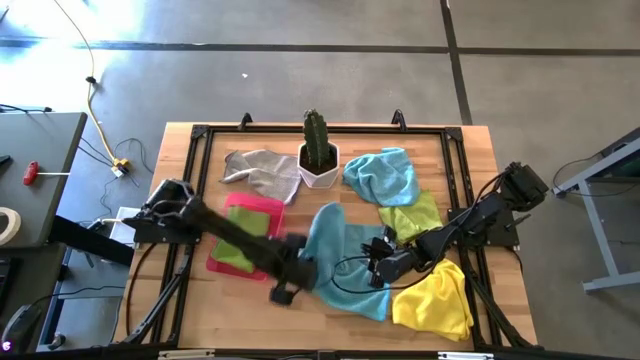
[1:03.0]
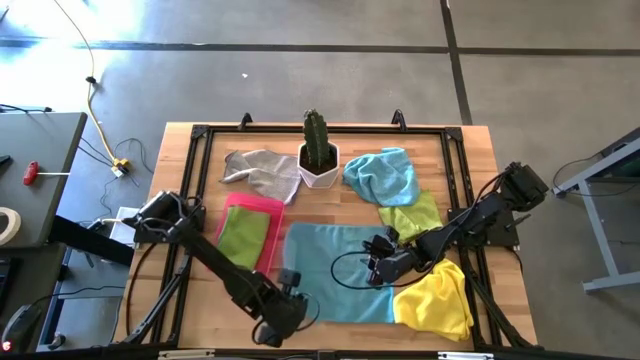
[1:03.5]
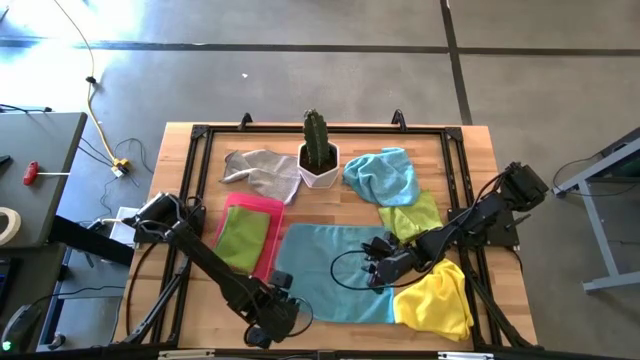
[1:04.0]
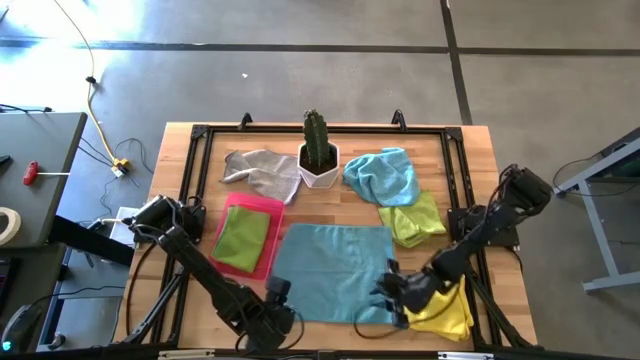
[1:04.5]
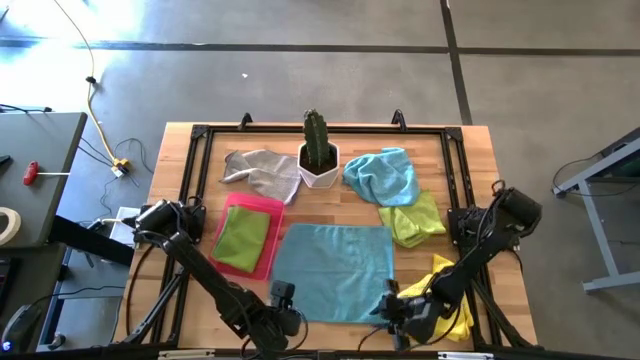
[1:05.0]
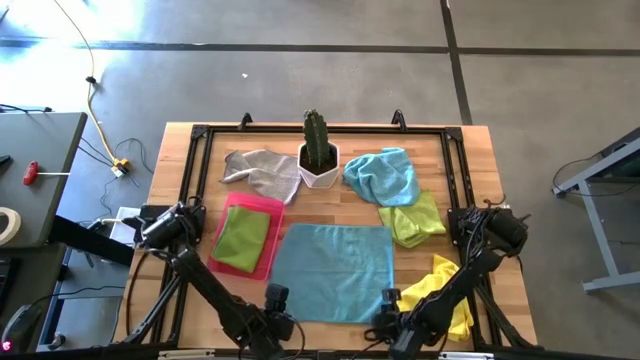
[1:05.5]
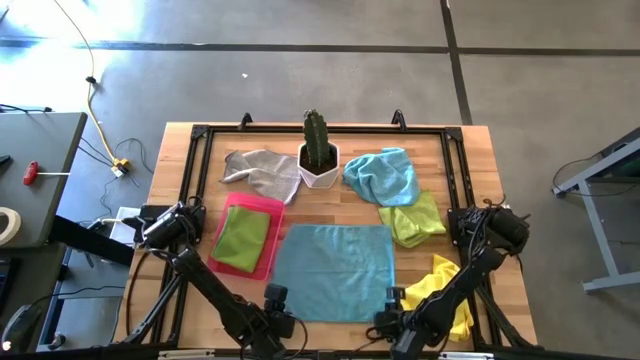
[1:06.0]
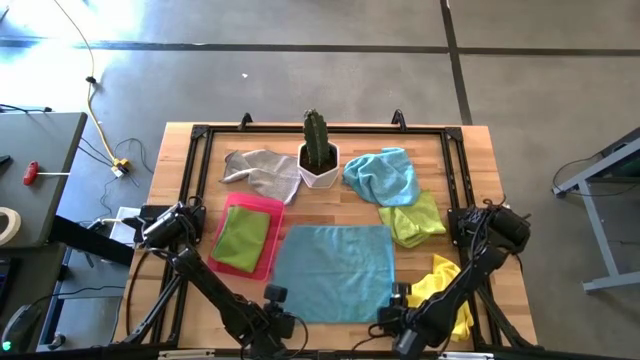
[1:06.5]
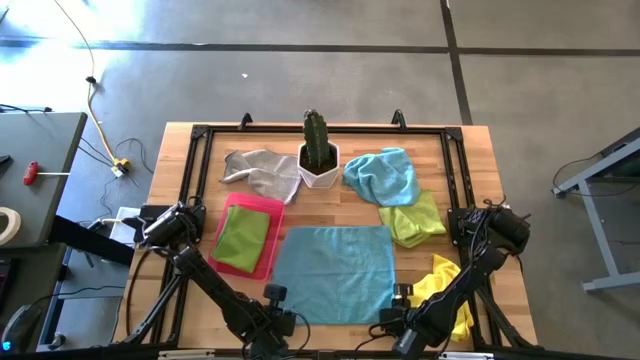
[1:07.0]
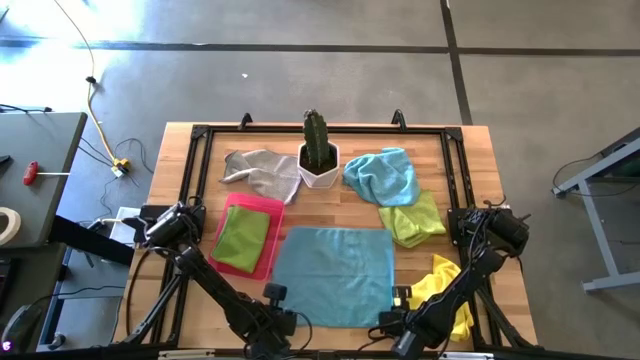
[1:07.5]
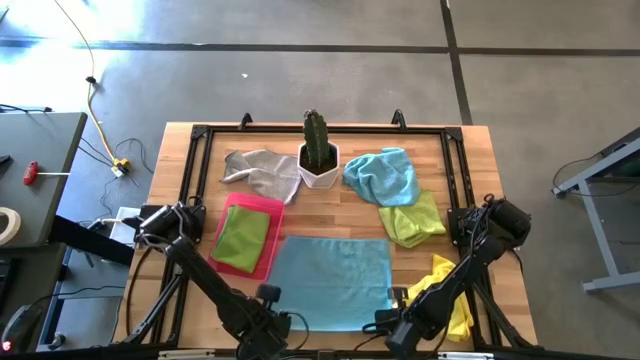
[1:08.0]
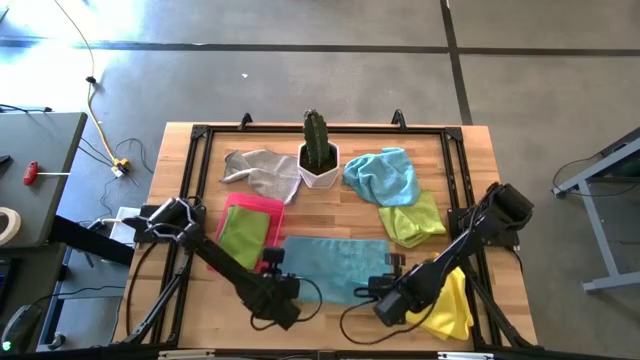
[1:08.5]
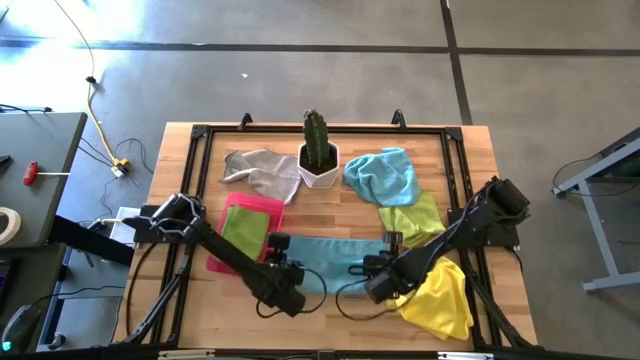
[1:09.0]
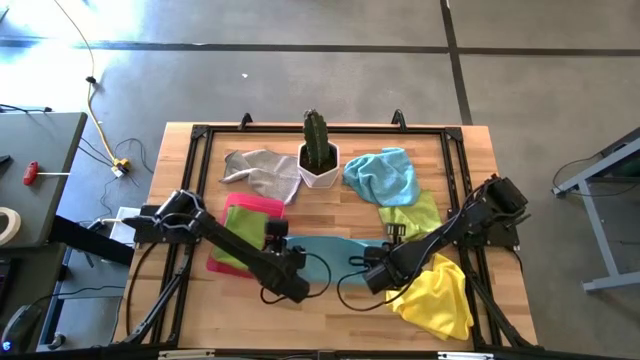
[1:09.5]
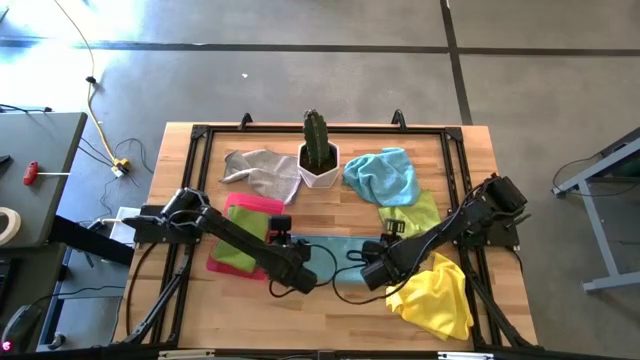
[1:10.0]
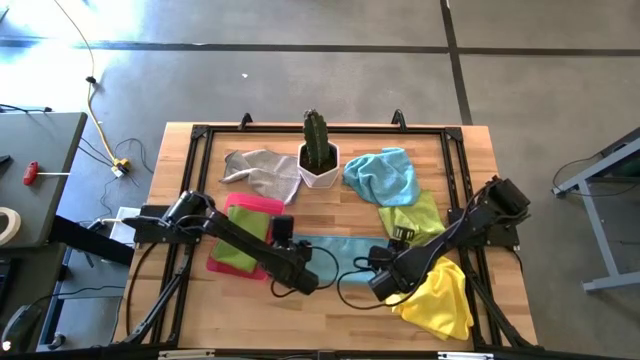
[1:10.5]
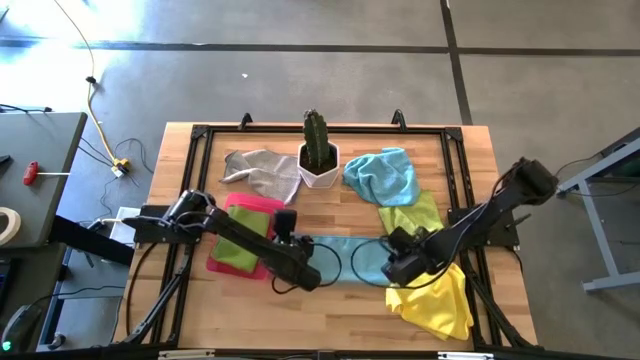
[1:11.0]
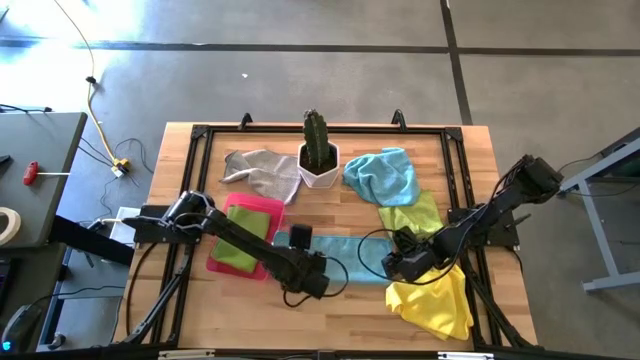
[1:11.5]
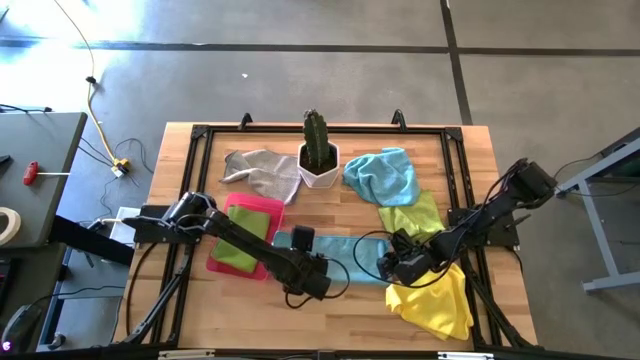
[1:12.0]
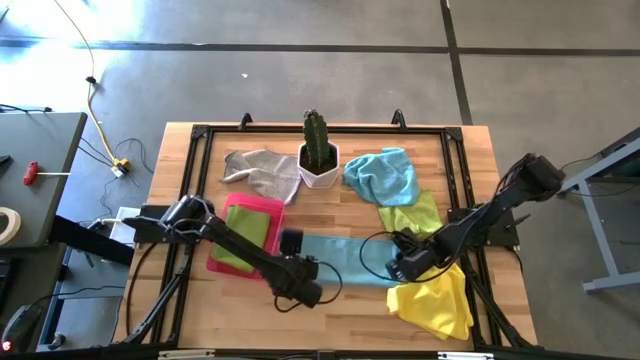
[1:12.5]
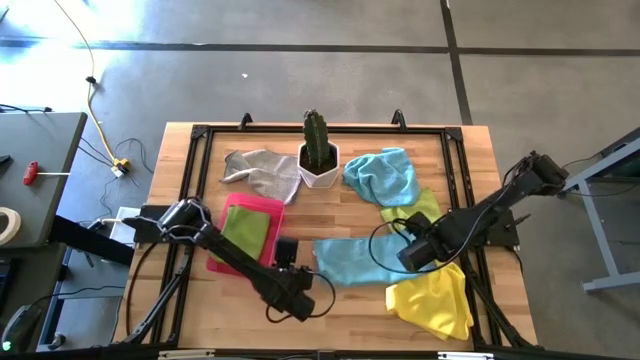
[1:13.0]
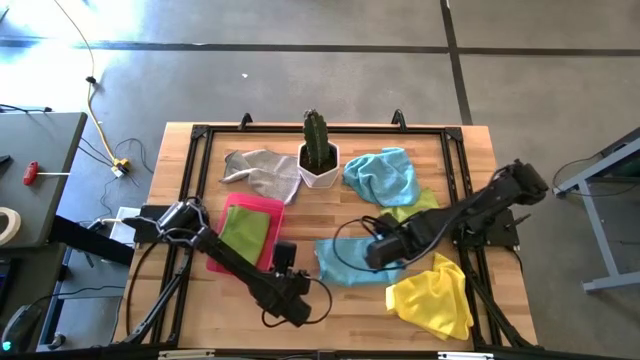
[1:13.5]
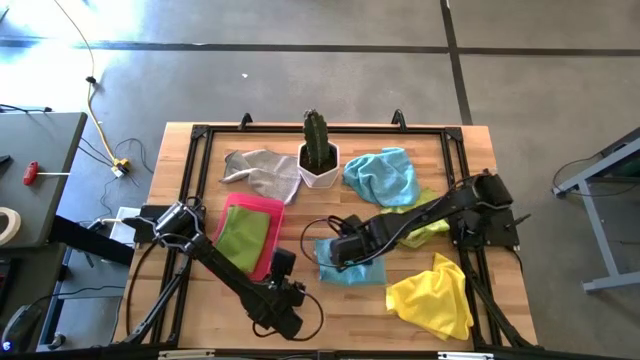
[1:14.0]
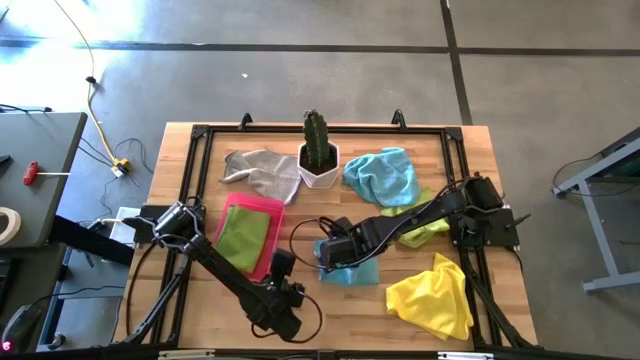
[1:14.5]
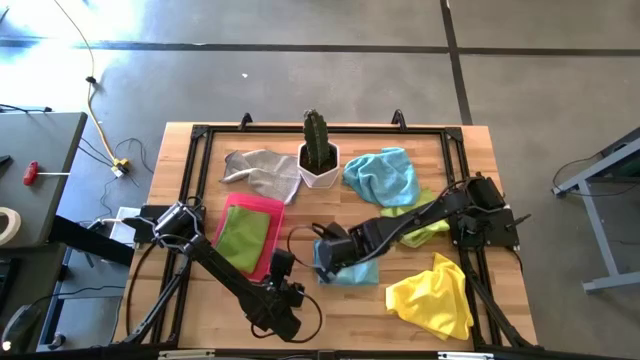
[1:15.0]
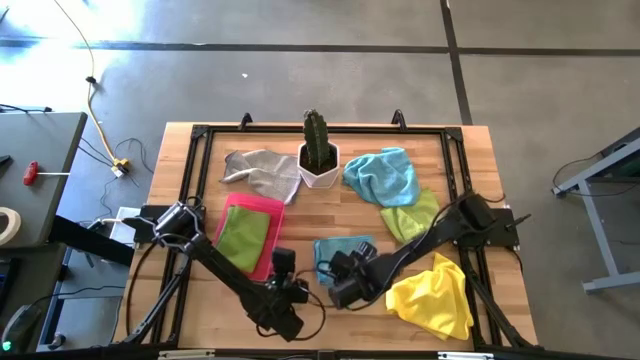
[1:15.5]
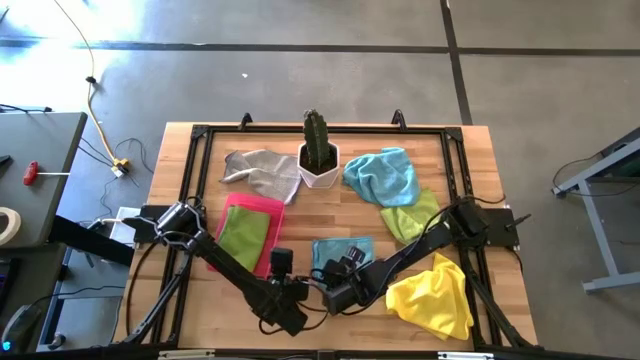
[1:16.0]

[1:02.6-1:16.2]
Task: Fold microfiber towels
Fold the bottom blue towel

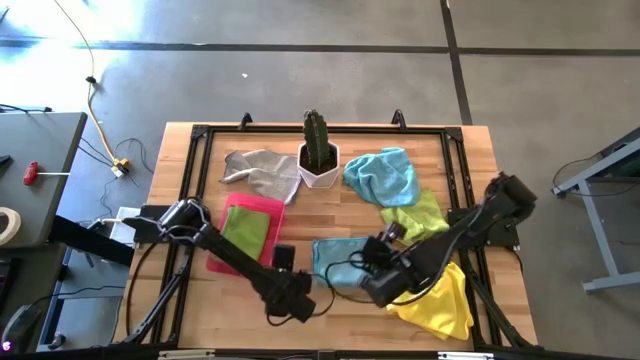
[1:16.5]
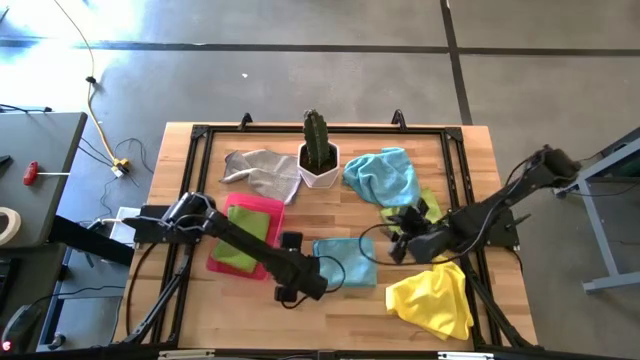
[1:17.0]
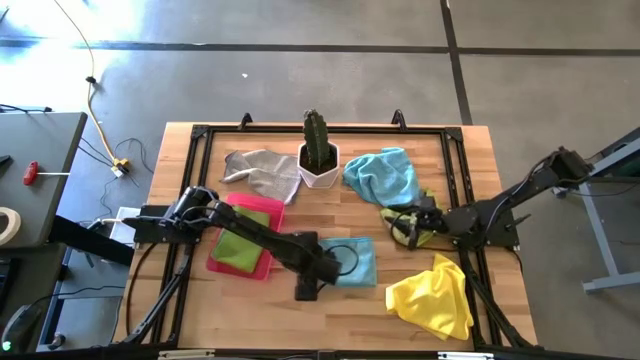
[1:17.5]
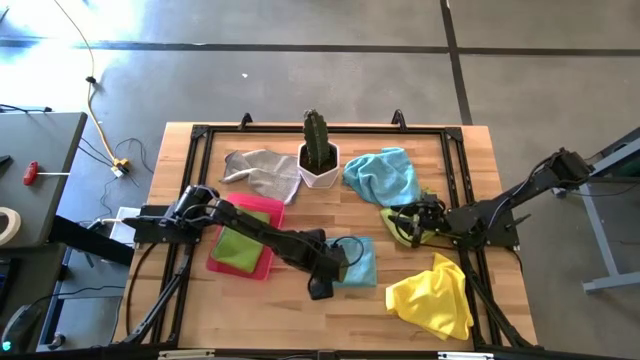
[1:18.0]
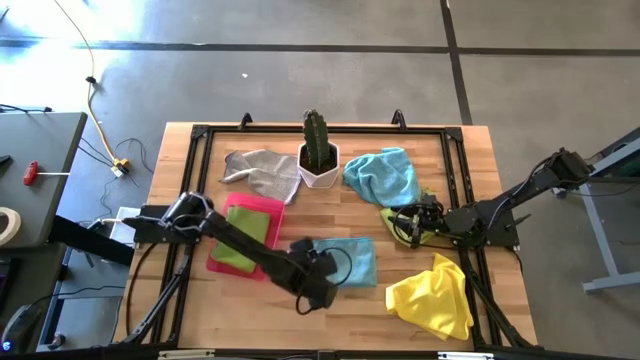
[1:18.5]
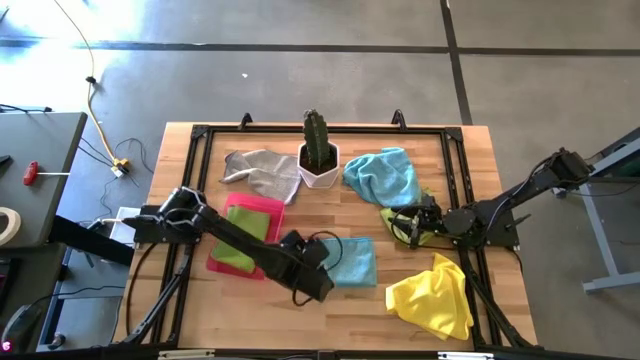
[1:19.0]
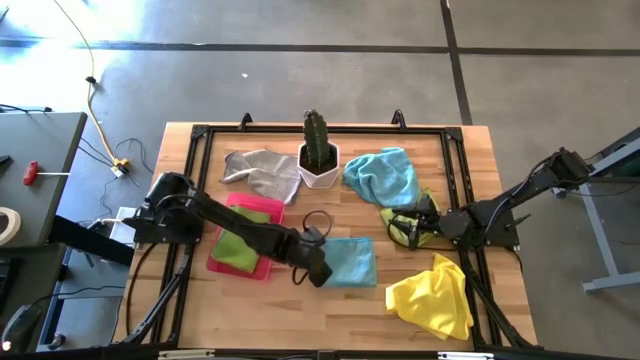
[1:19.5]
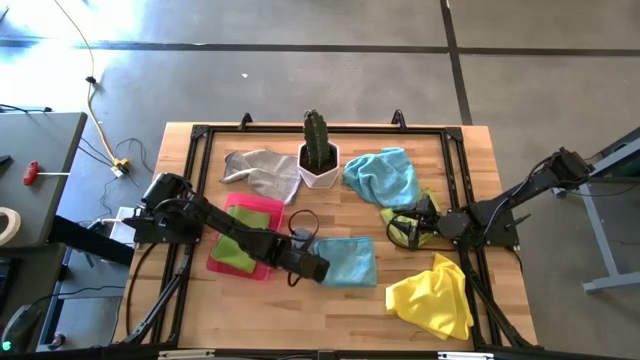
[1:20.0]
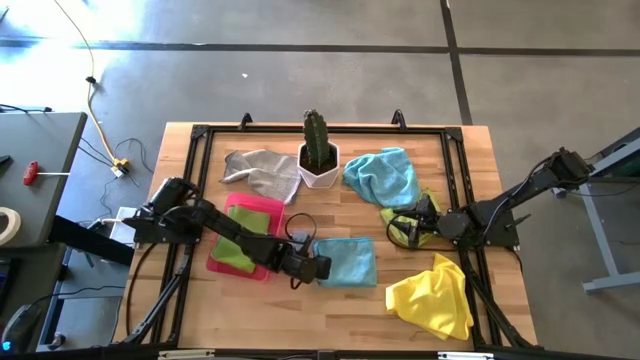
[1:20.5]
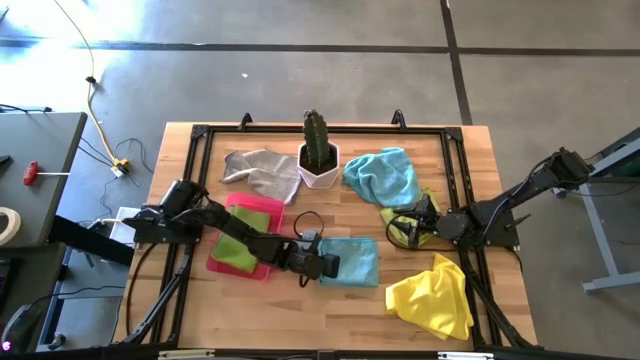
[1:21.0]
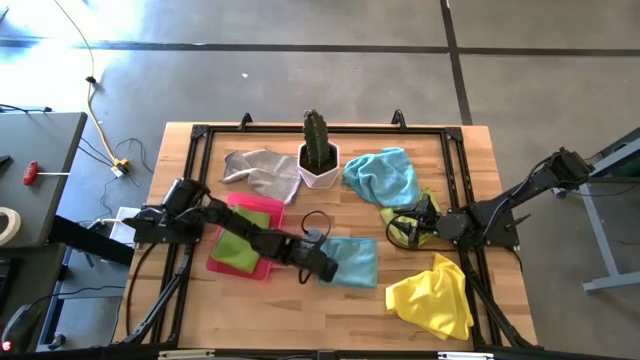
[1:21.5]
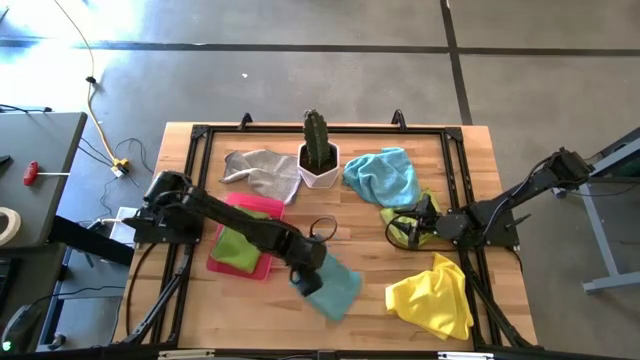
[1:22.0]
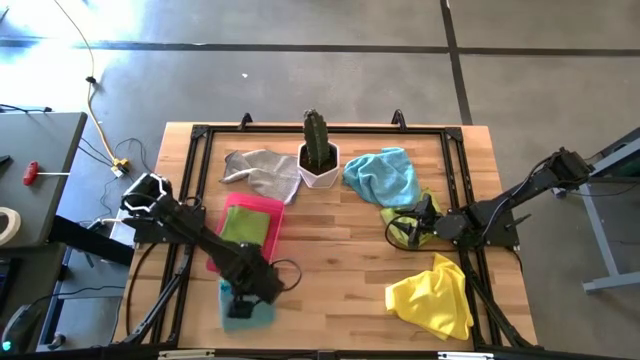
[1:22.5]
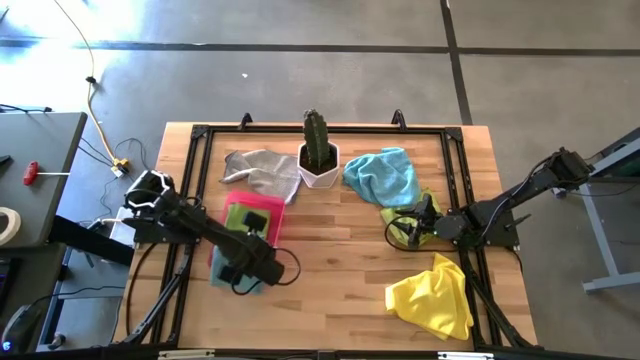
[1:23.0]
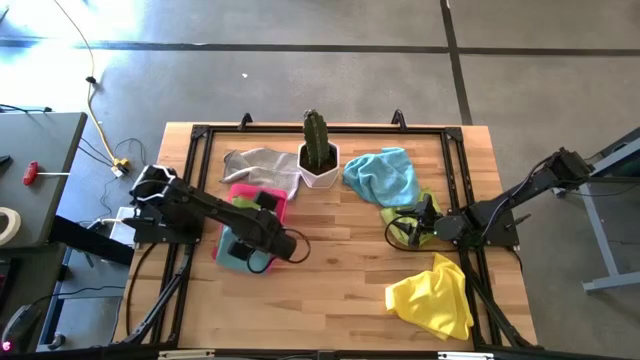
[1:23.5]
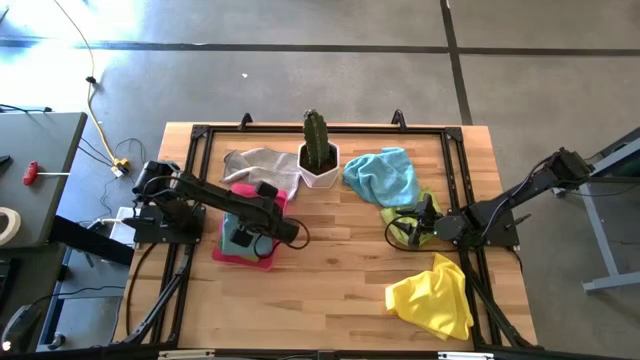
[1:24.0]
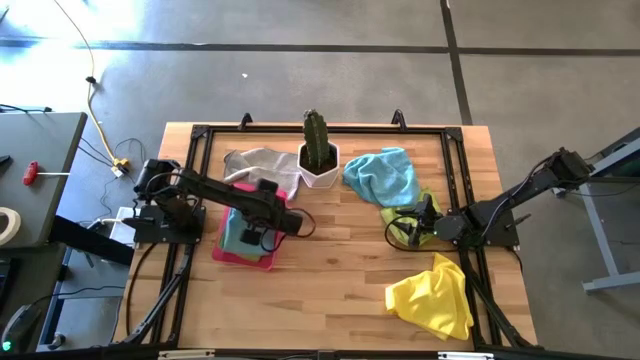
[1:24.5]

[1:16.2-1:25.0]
Put the bottom blue towel in the pink bin
